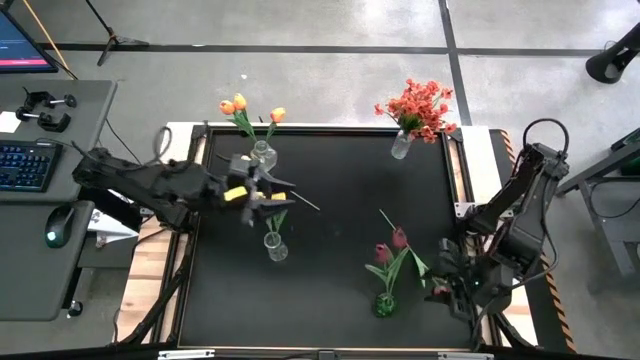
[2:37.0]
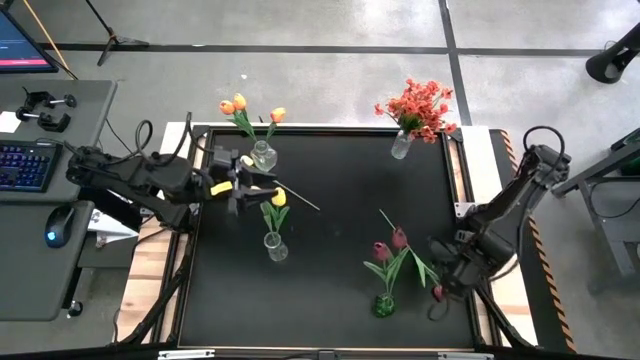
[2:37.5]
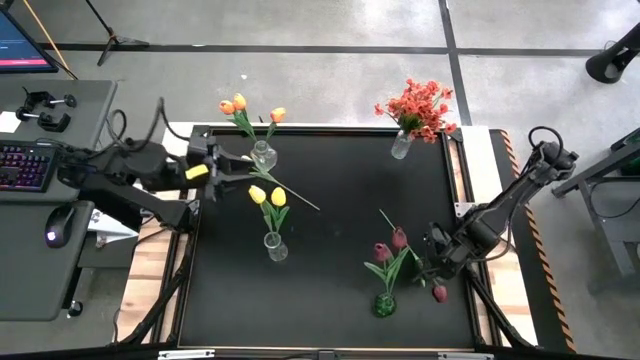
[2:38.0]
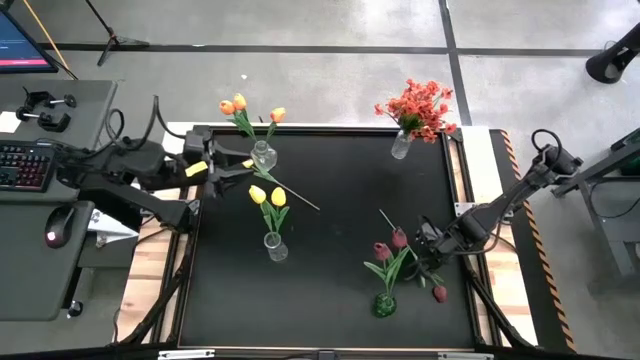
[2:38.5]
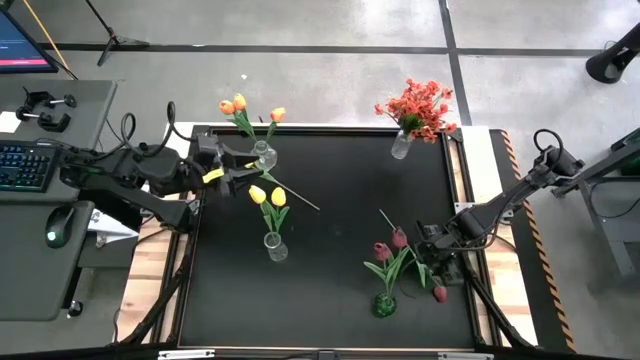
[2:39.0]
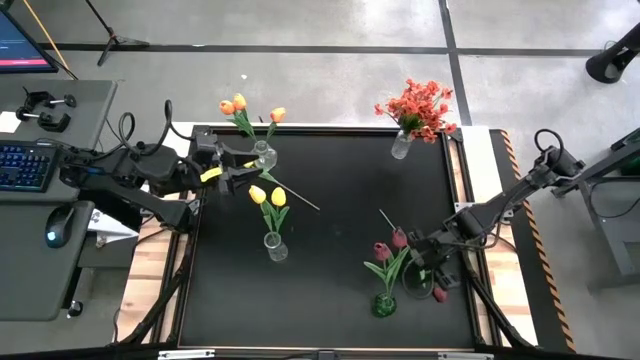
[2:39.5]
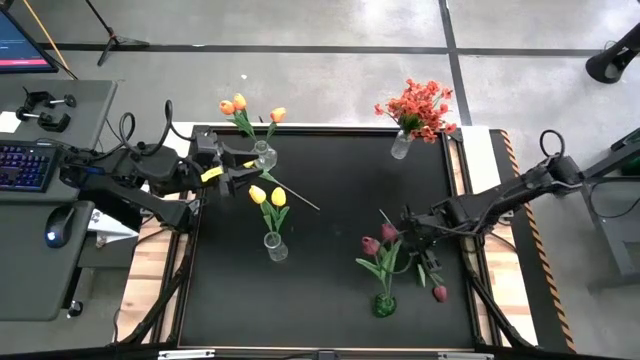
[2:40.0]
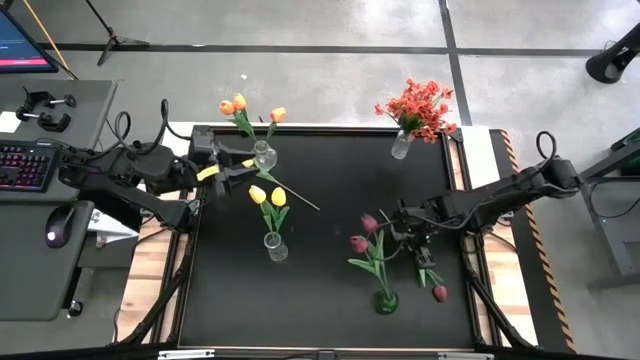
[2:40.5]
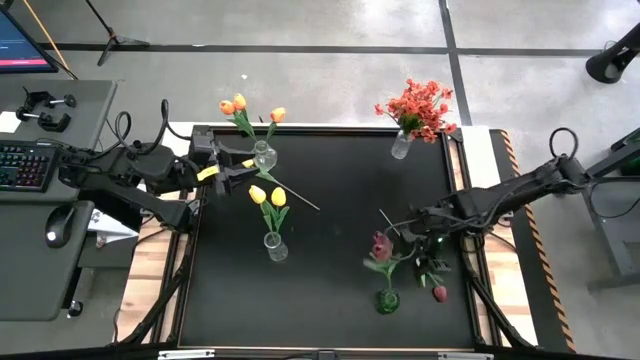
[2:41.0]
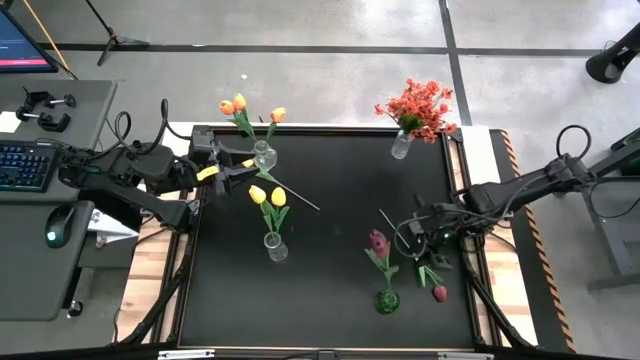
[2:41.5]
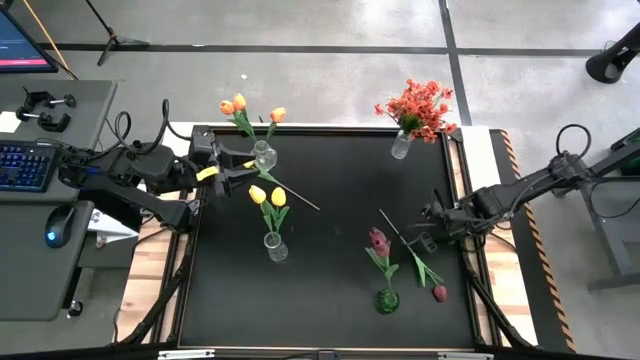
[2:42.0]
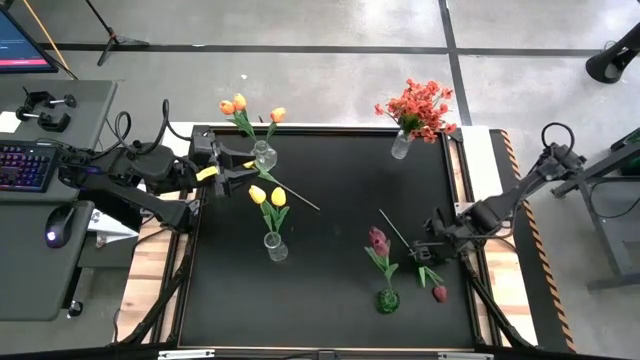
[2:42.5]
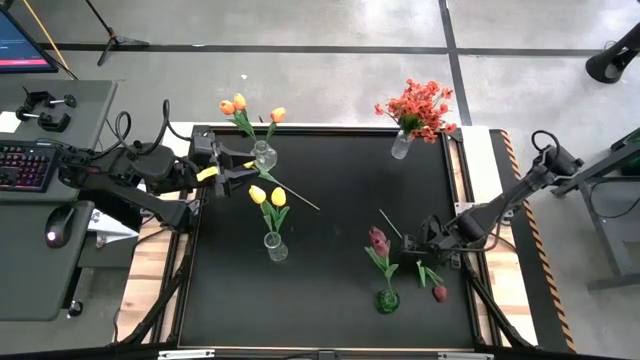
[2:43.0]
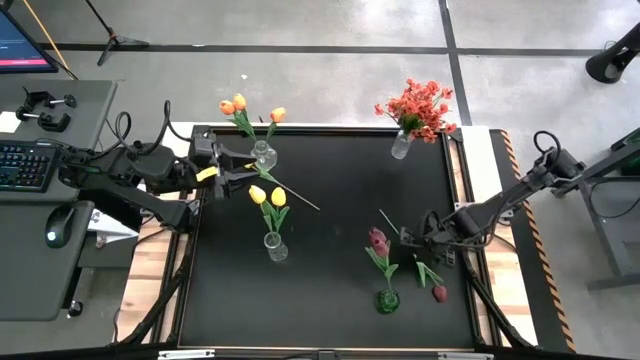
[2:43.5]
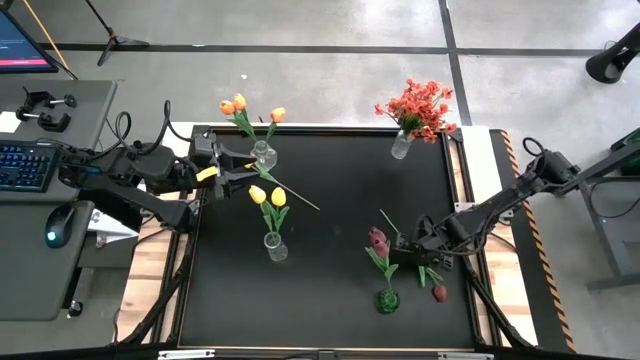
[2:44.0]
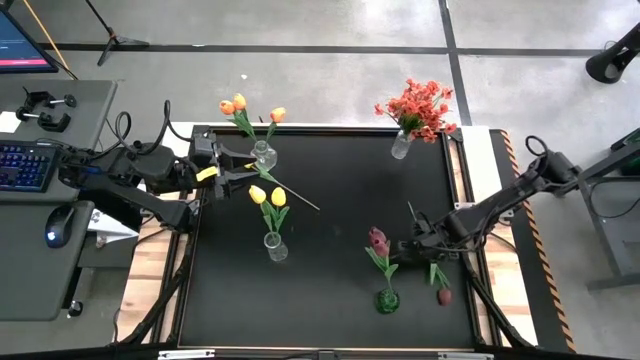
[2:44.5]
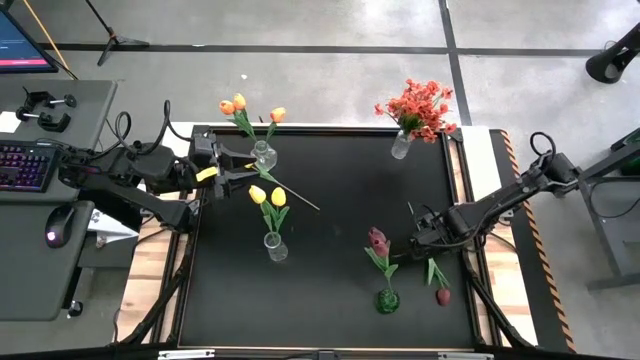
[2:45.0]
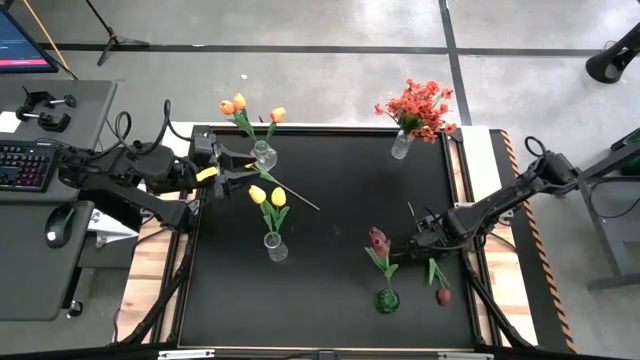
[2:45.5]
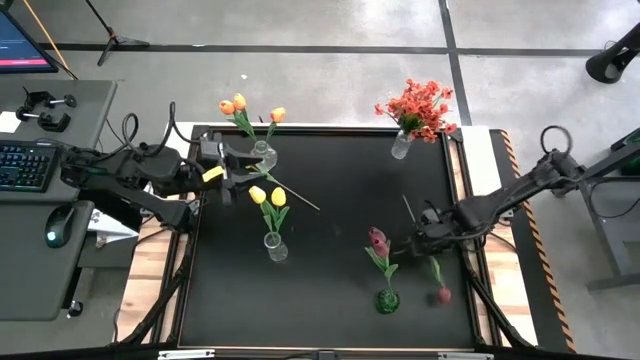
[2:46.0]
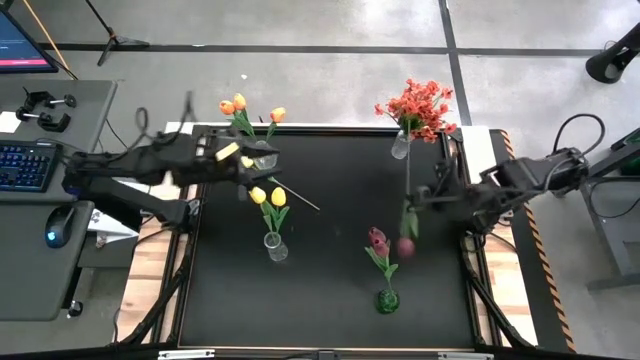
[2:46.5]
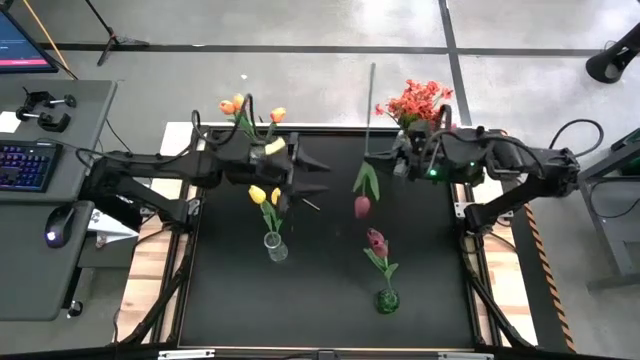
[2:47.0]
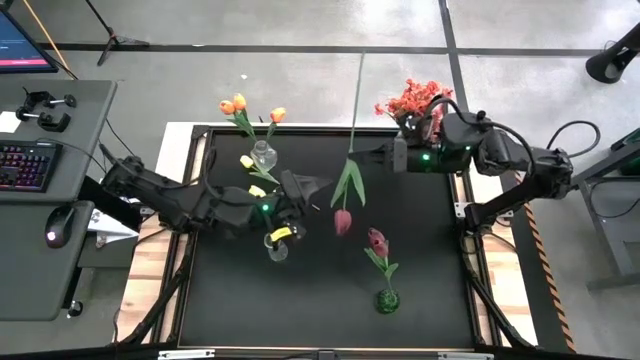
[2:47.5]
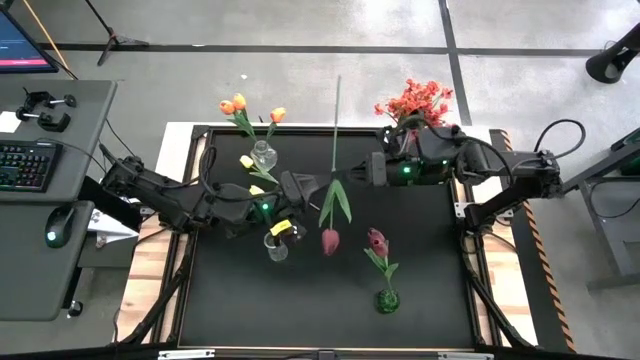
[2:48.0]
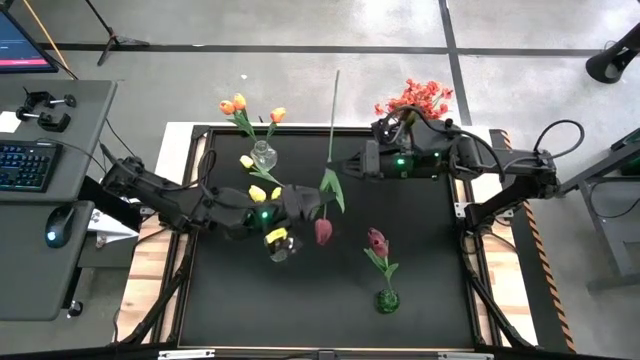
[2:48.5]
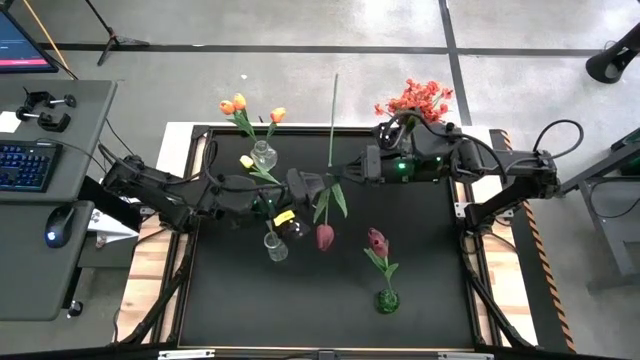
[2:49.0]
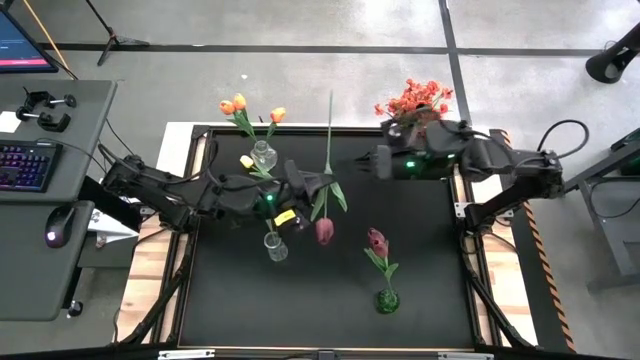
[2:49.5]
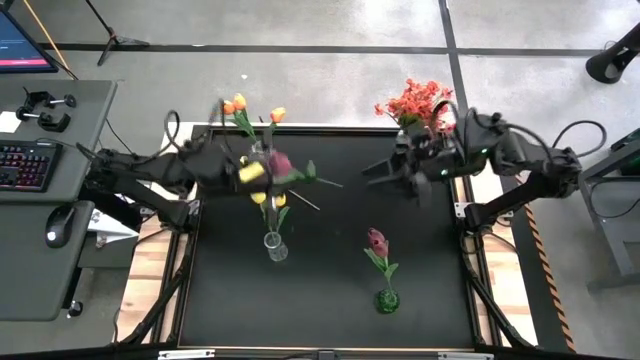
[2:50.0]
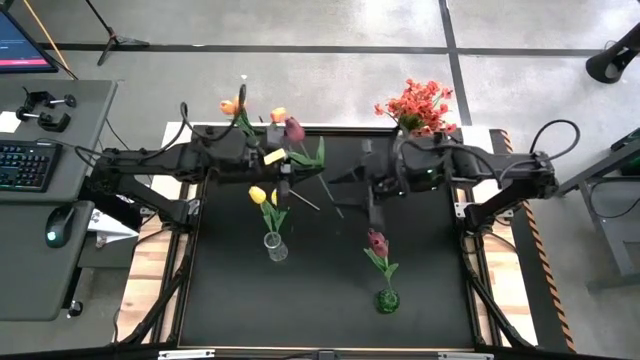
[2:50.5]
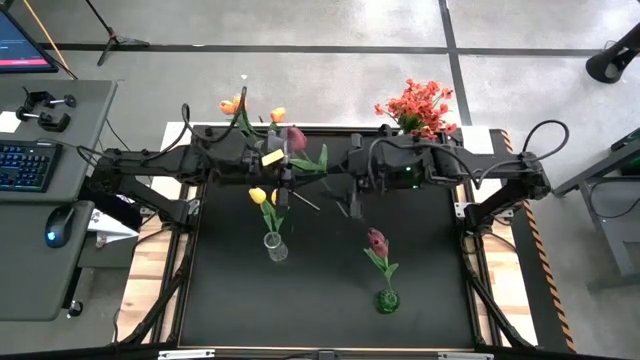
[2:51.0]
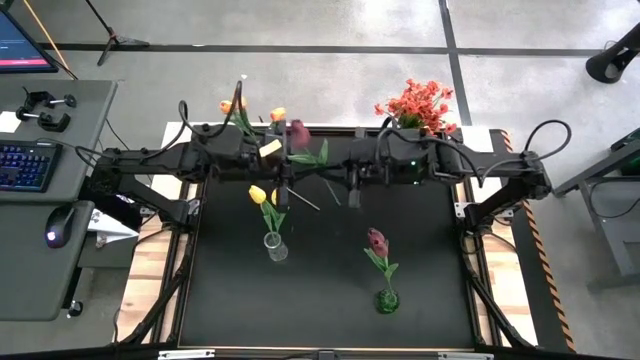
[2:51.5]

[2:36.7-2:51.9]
Task: Sort flowers into vase by color
Put the dark red flower into the green vase
